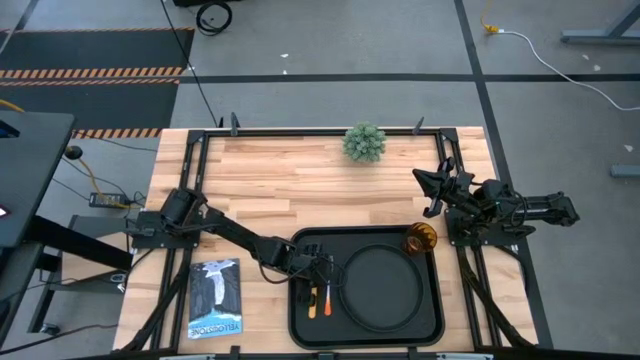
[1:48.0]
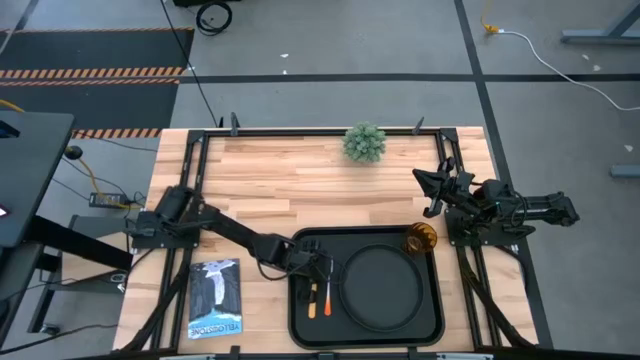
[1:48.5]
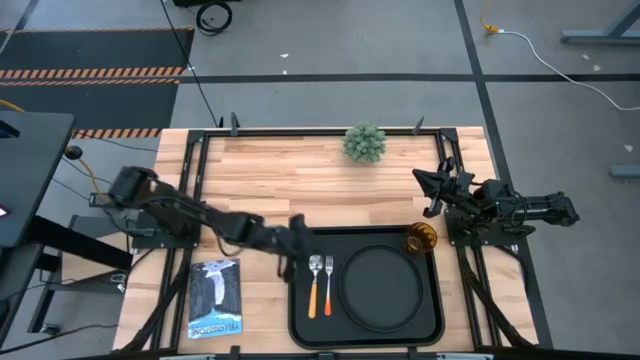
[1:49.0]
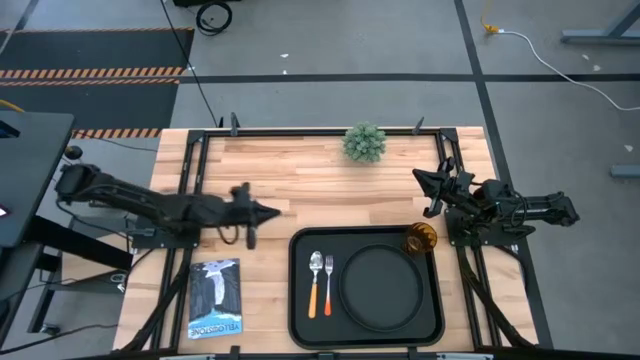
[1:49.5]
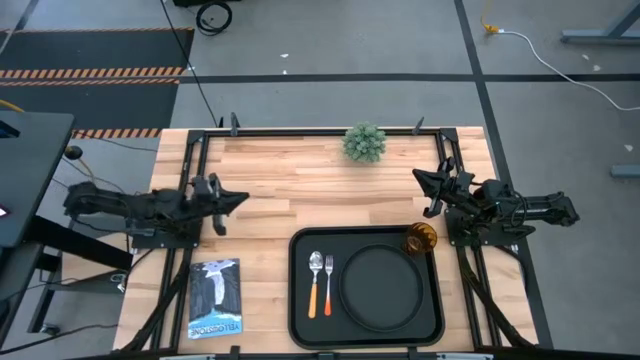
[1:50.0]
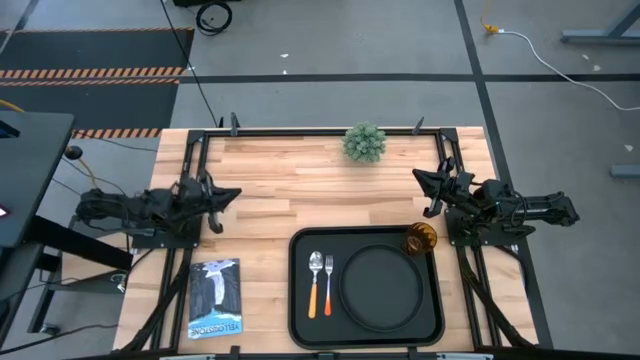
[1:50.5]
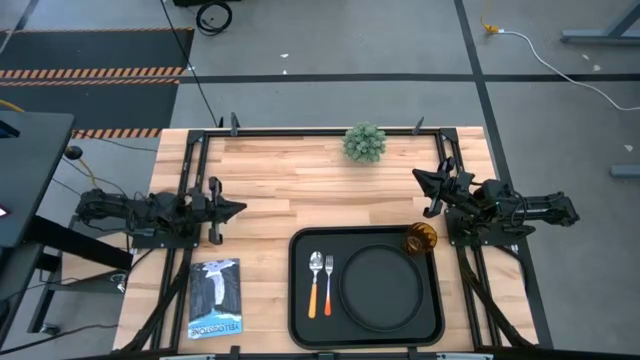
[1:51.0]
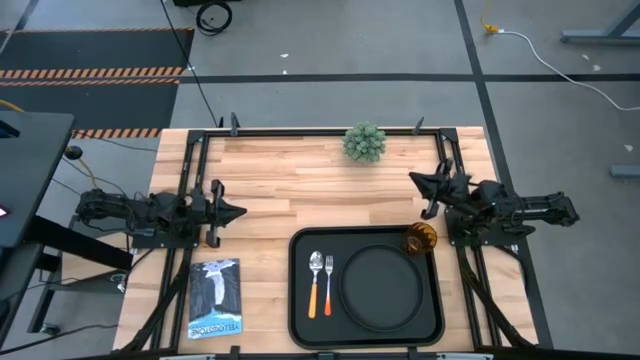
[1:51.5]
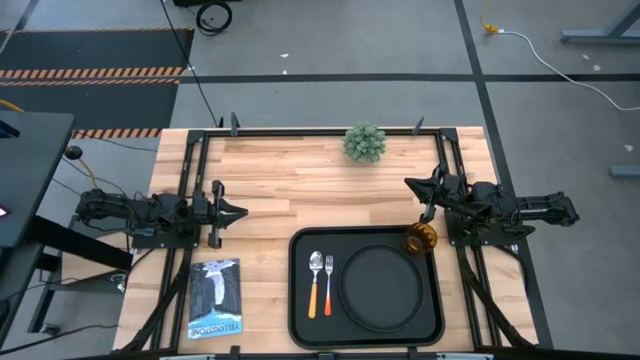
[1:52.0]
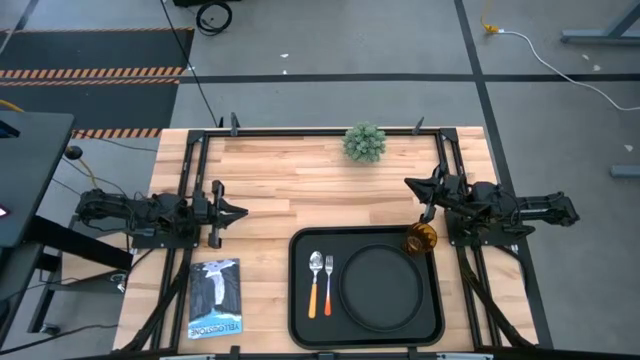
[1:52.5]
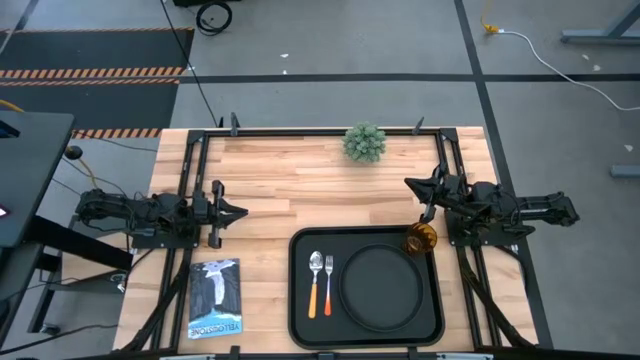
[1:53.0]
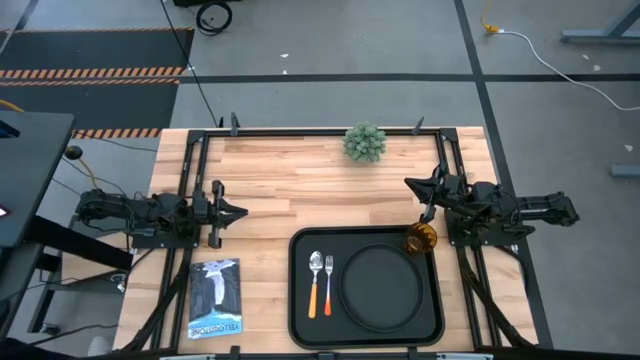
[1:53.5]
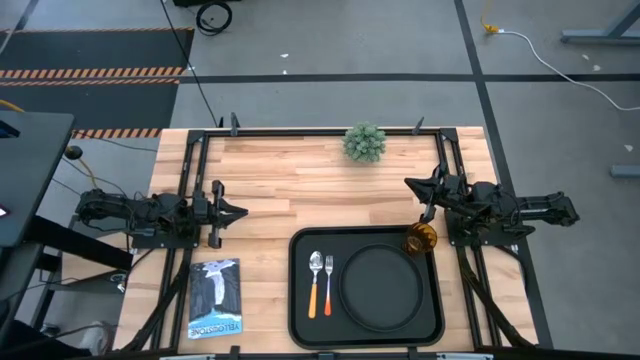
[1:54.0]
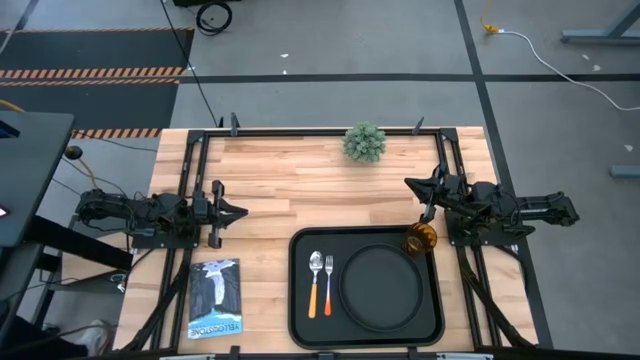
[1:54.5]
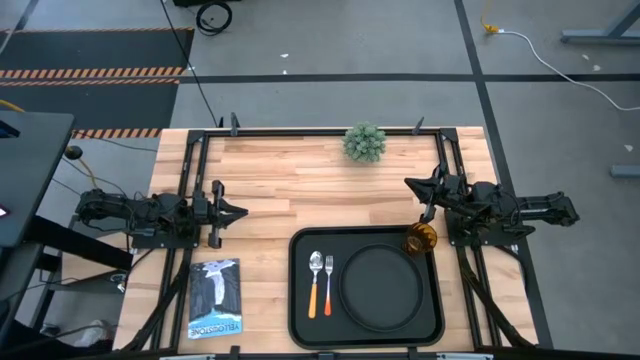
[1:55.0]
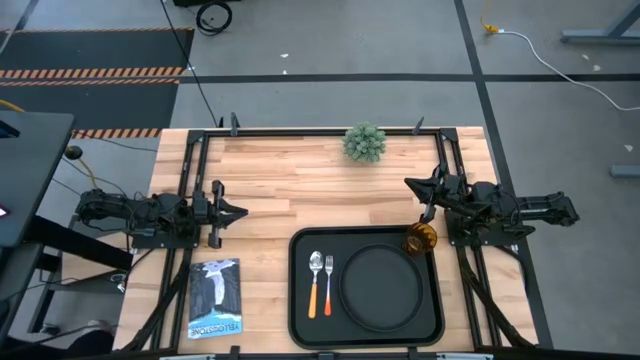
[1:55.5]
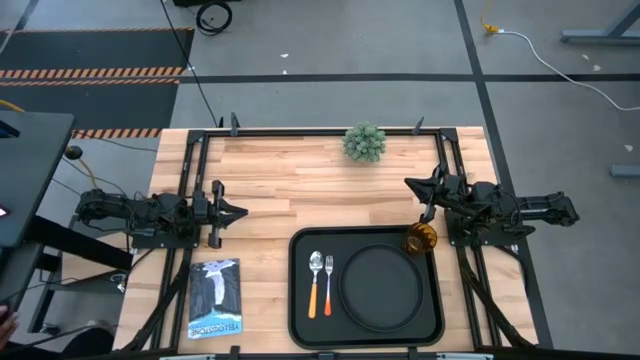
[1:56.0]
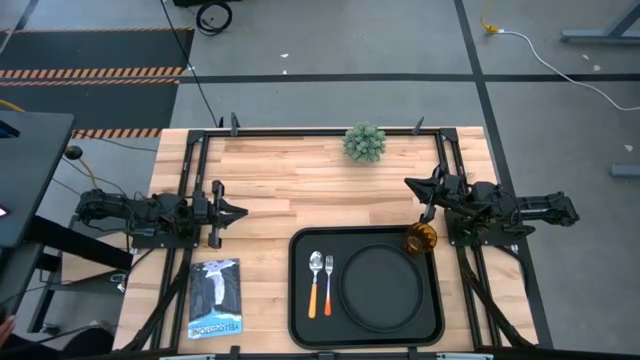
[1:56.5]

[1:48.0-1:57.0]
Task: Pick and place plate/cup/fork/spoon on tray
Return to Home Position

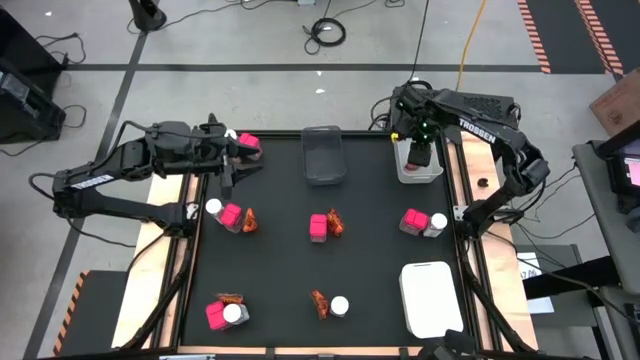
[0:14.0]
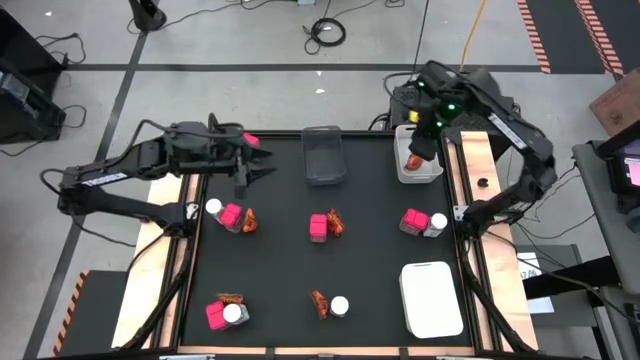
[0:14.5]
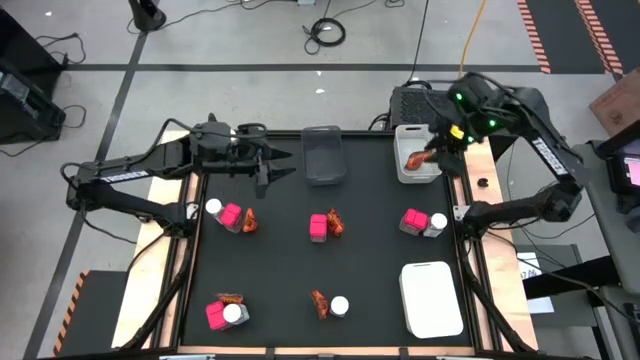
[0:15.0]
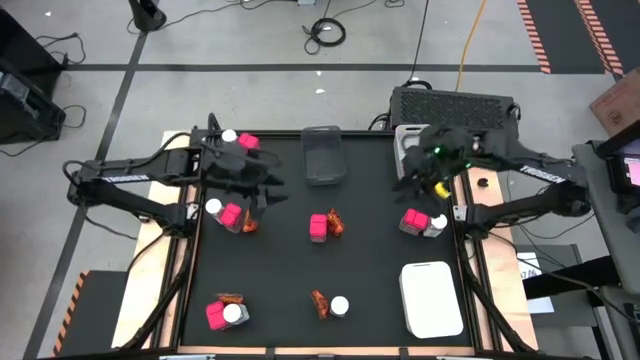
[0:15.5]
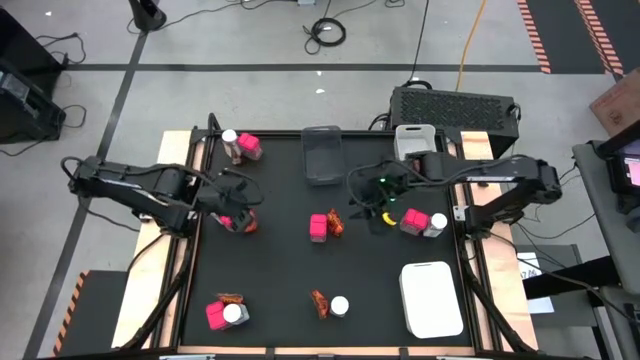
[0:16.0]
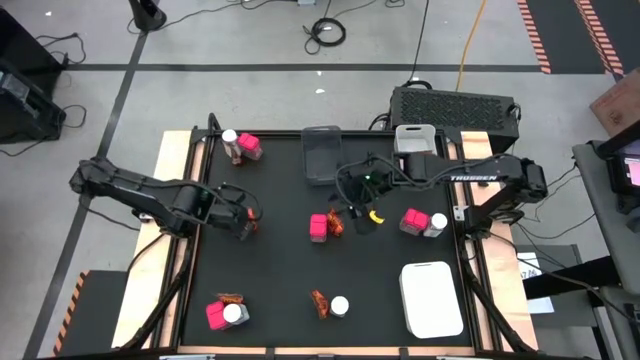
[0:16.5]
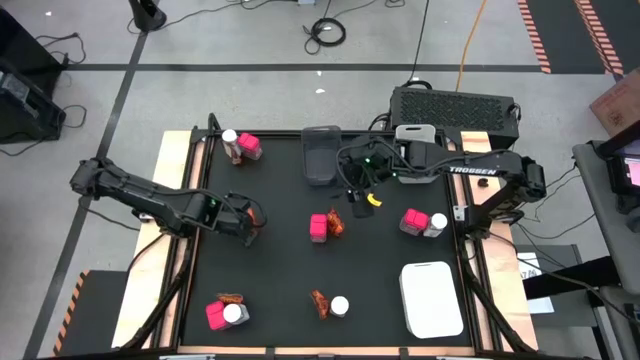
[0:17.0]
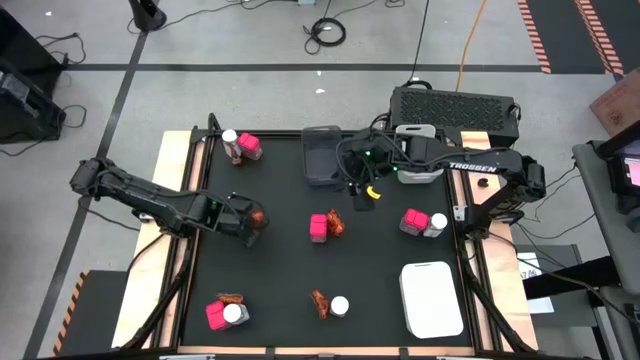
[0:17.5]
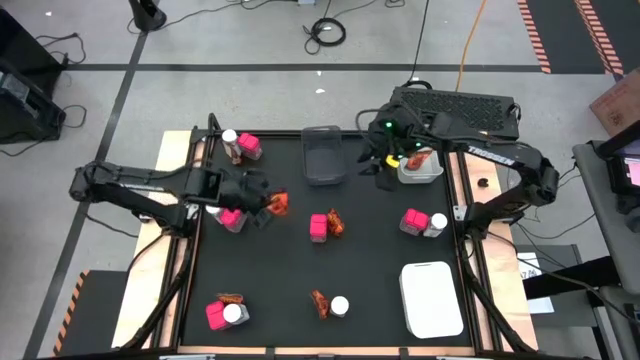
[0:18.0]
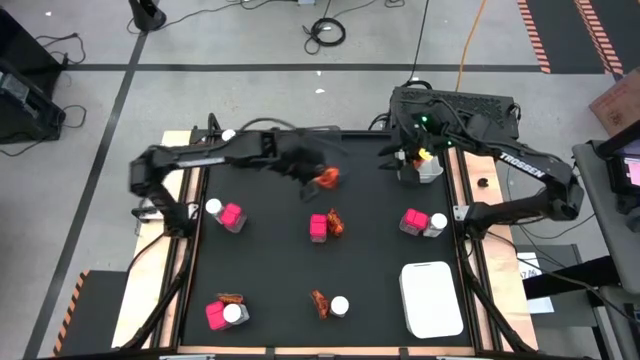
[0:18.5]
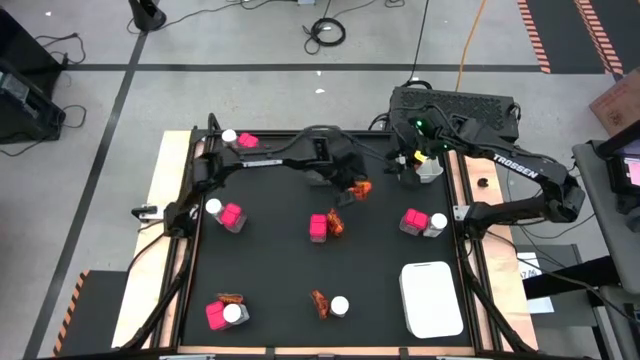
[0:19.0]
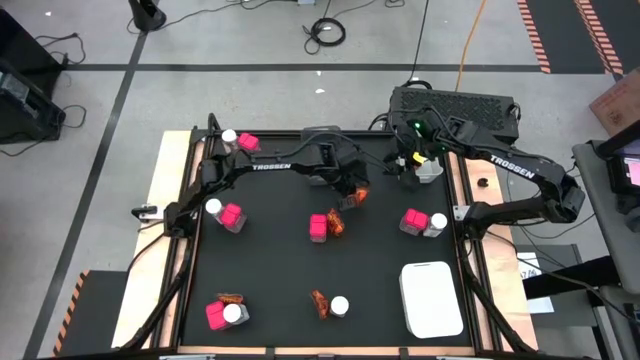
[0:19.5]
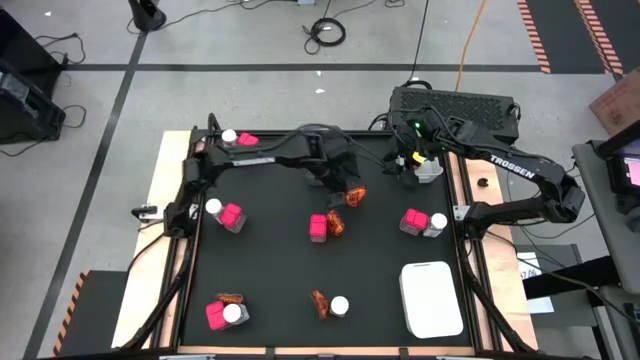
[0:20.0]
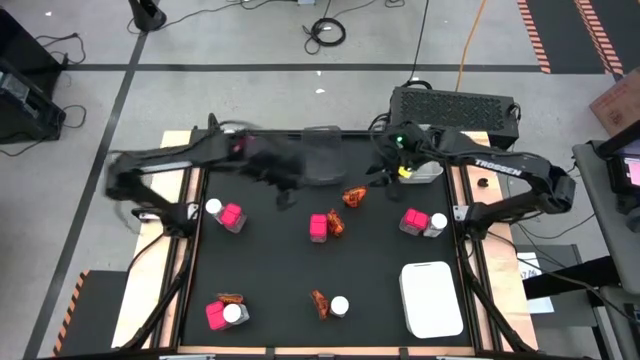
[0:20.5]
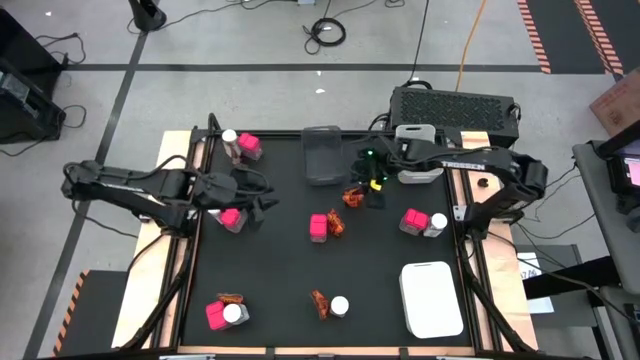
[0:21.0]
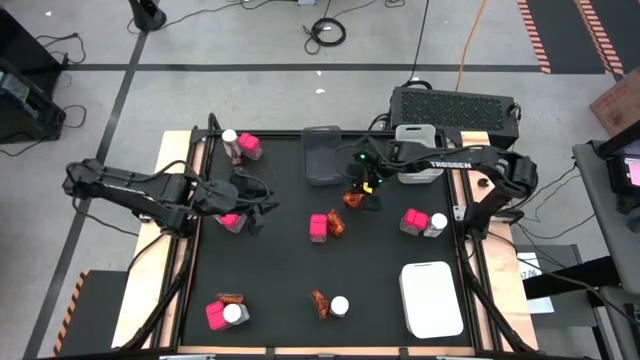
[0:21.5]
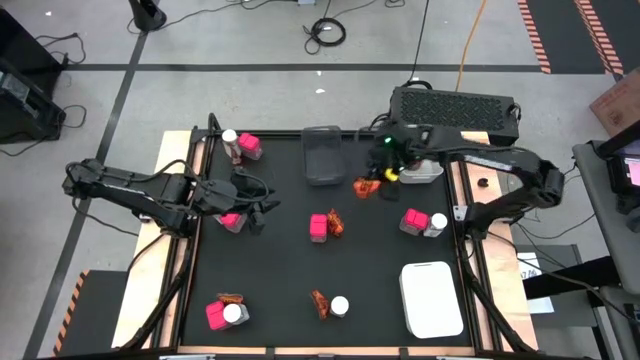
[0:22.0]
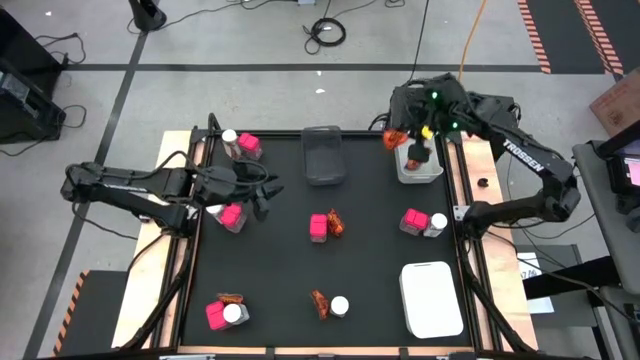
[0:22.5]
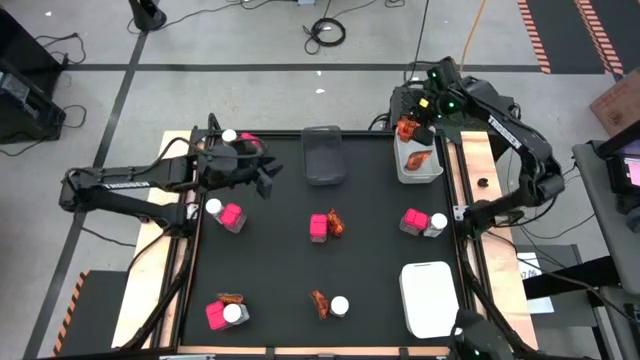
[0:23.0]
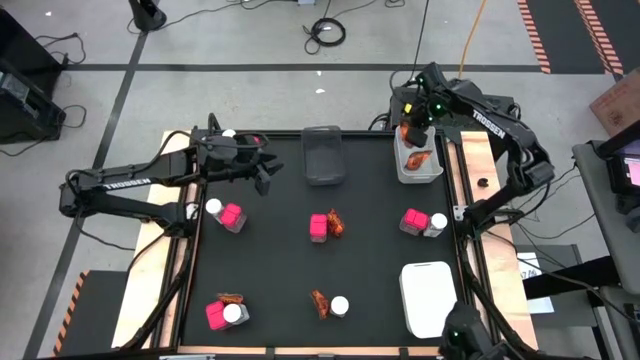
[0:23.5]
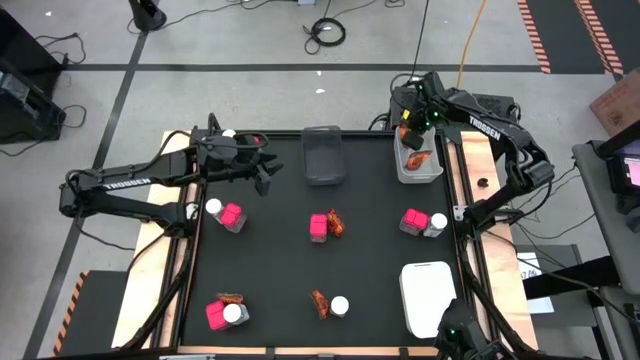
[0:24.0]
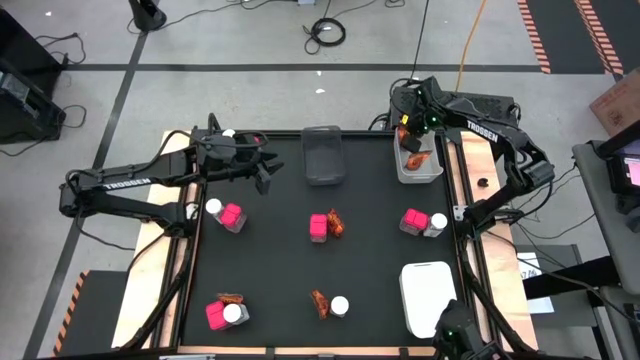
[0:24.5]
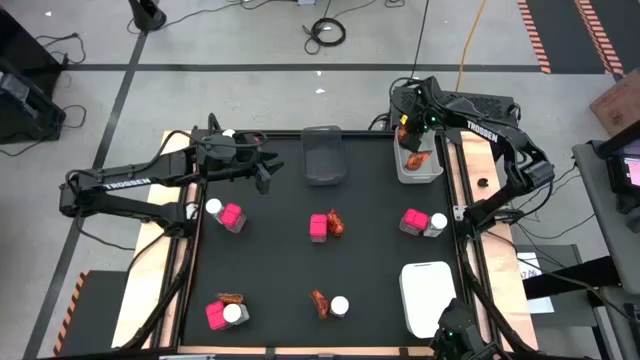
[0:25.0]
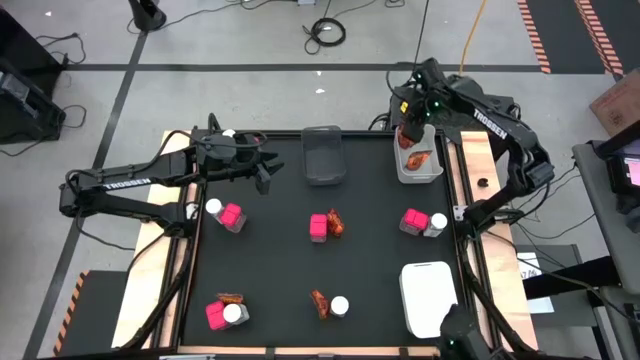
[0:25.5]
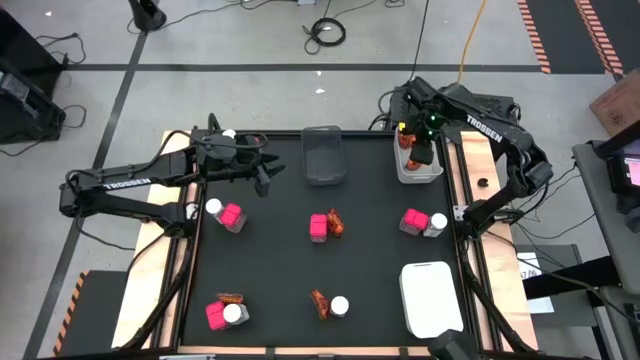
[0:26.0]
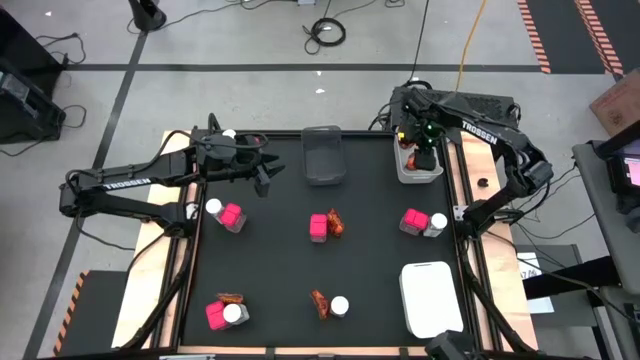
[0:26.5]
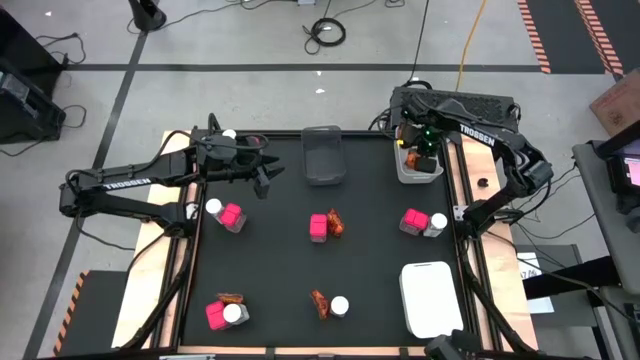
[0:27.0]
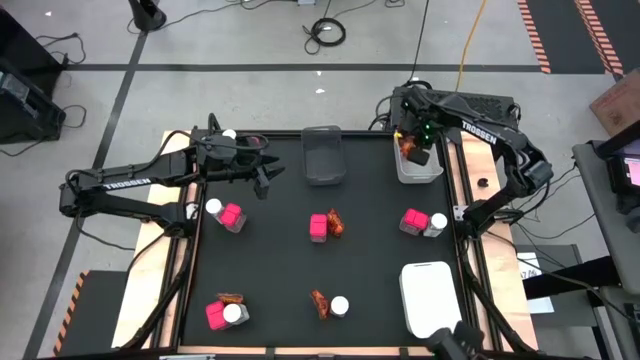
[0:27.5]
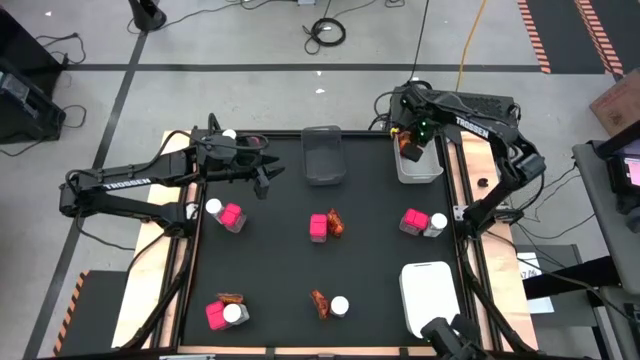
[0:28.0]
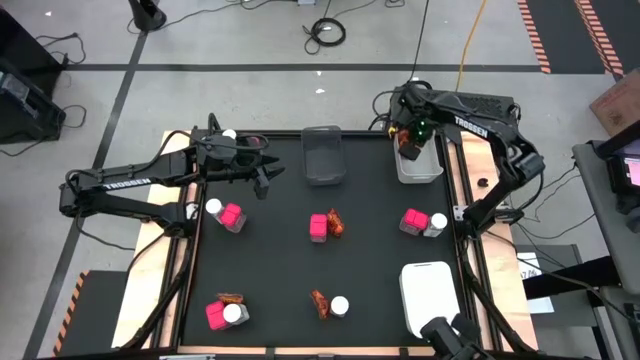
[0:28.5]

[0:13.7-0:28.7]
Task: Sort spices by type
Put the orange seasoning pack into the top white bin
